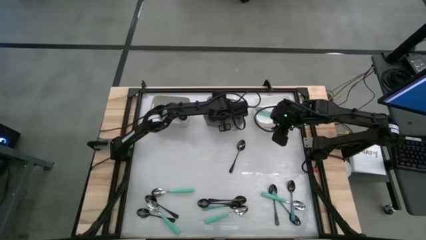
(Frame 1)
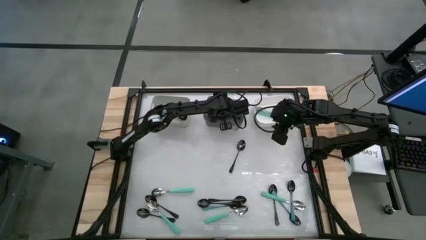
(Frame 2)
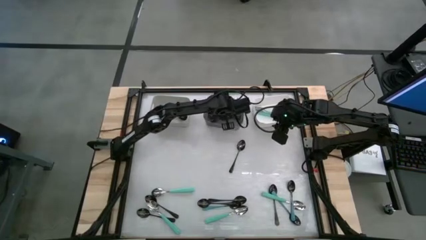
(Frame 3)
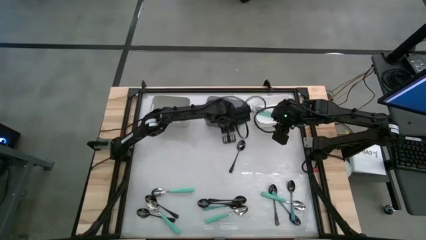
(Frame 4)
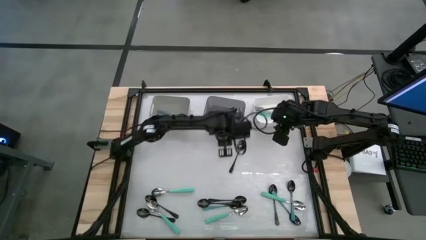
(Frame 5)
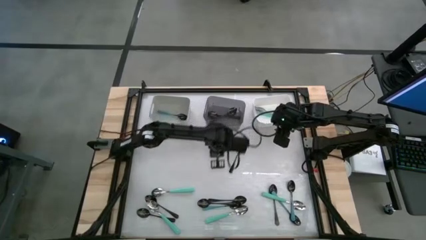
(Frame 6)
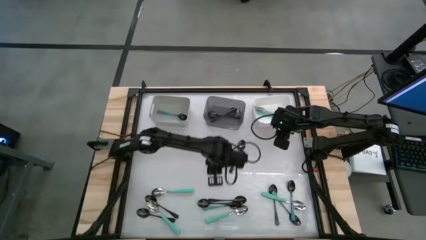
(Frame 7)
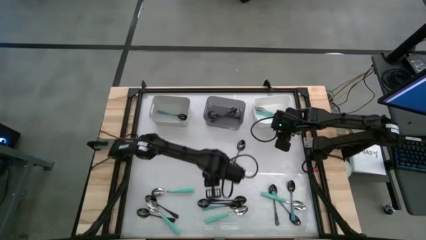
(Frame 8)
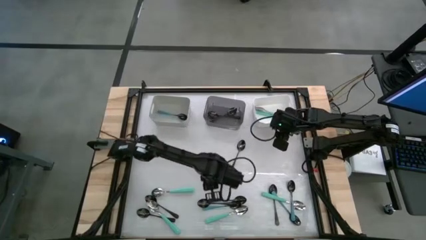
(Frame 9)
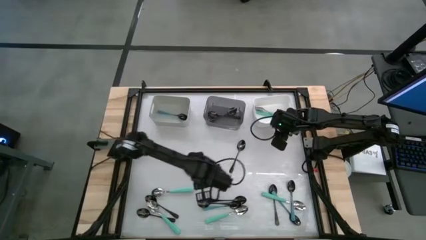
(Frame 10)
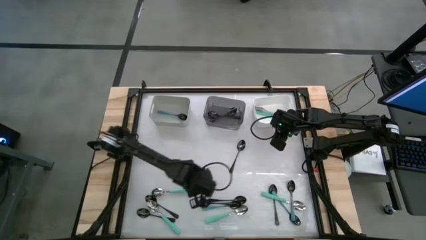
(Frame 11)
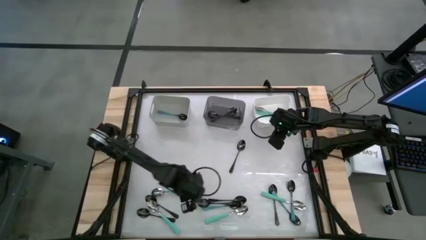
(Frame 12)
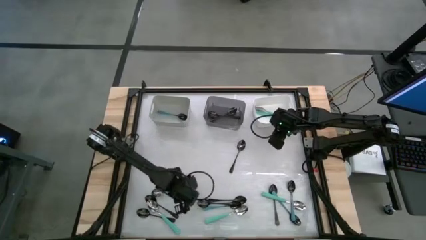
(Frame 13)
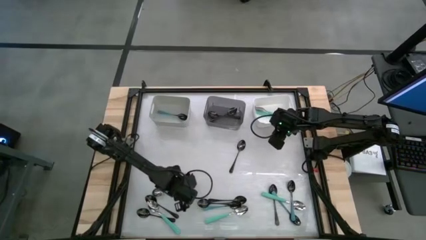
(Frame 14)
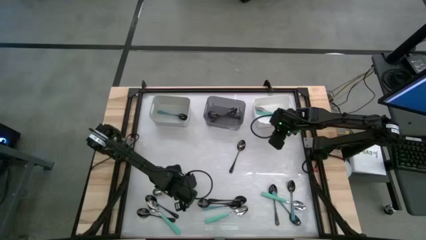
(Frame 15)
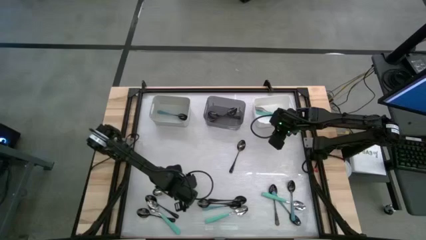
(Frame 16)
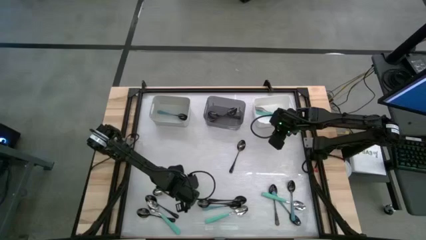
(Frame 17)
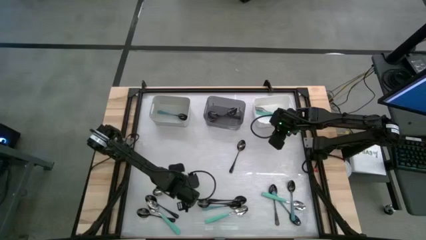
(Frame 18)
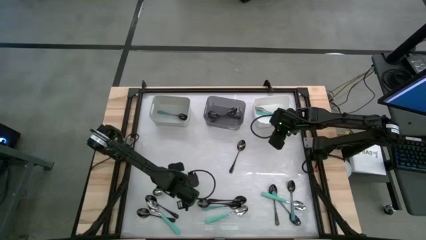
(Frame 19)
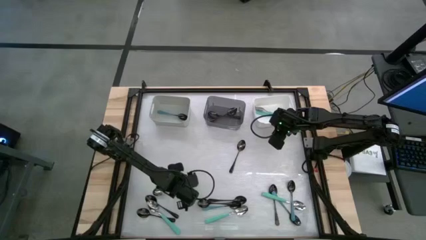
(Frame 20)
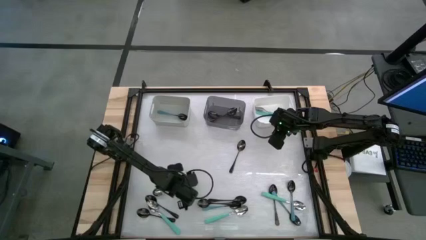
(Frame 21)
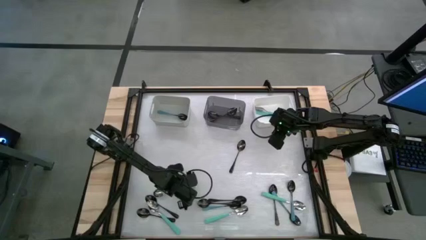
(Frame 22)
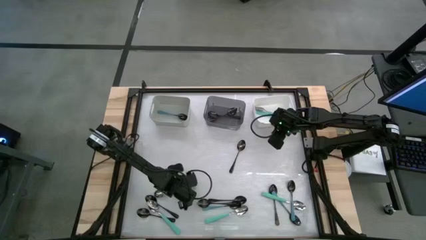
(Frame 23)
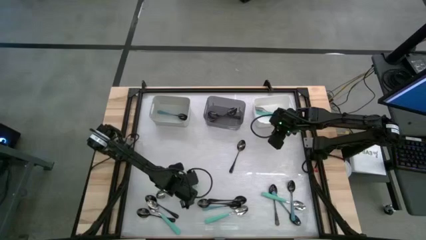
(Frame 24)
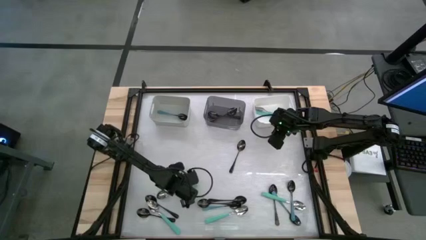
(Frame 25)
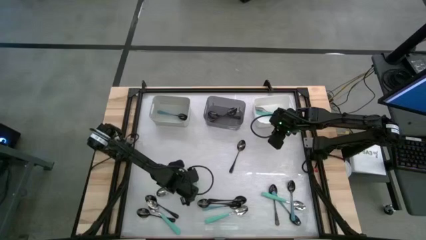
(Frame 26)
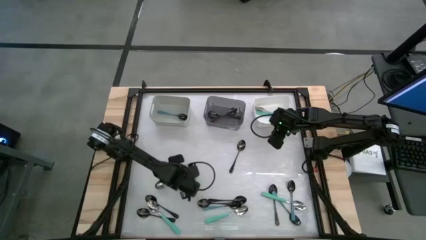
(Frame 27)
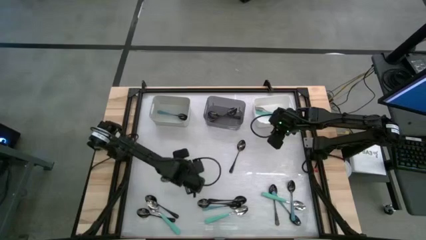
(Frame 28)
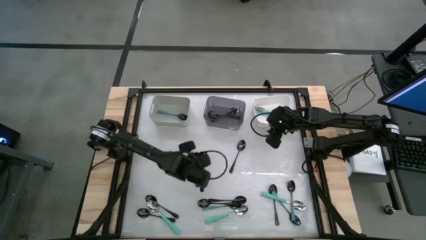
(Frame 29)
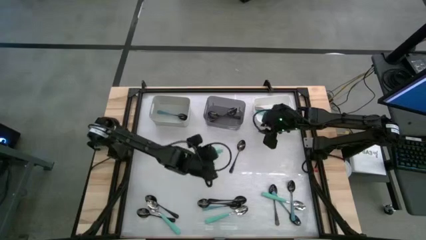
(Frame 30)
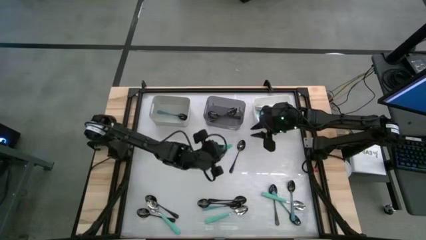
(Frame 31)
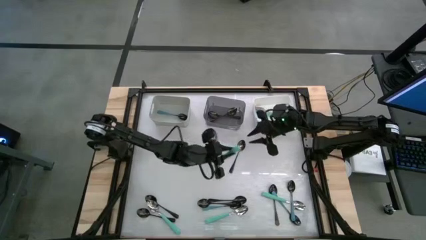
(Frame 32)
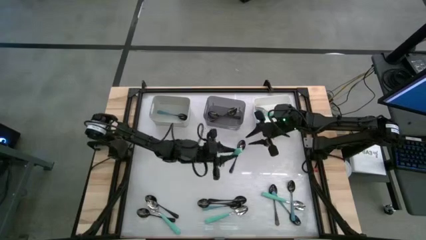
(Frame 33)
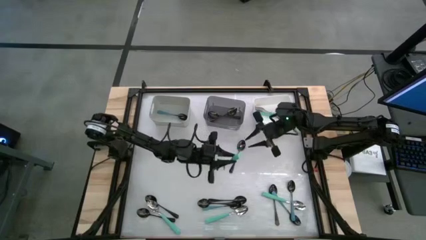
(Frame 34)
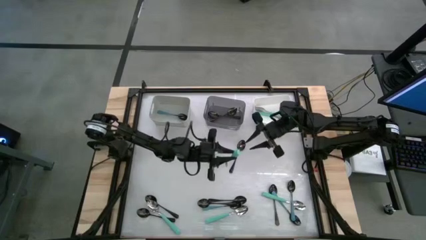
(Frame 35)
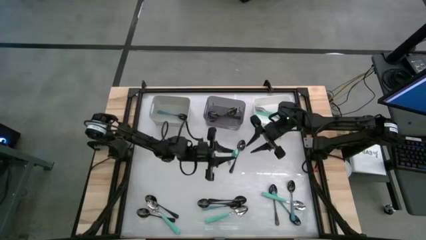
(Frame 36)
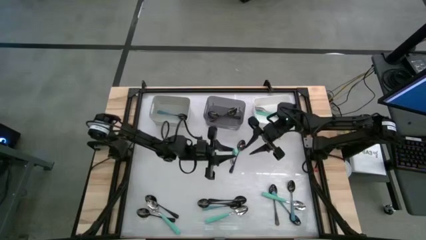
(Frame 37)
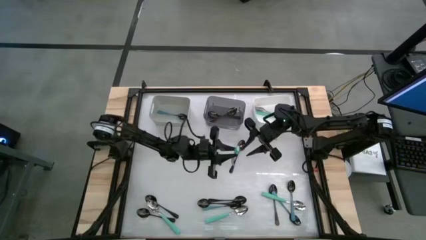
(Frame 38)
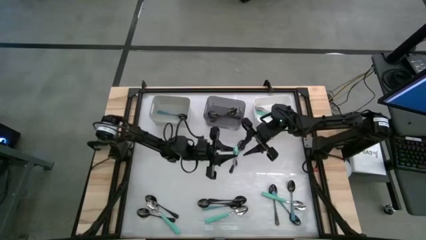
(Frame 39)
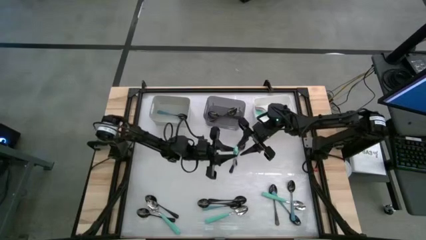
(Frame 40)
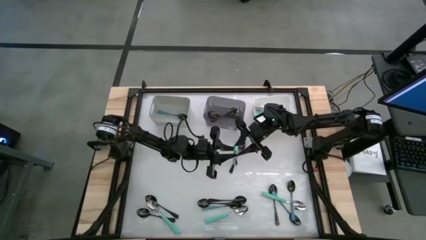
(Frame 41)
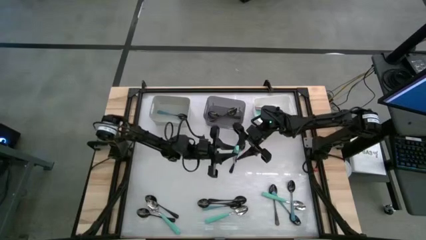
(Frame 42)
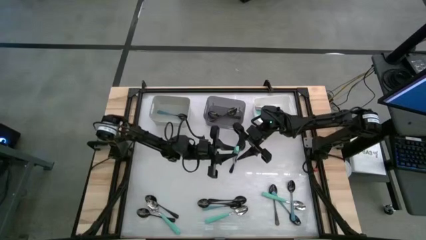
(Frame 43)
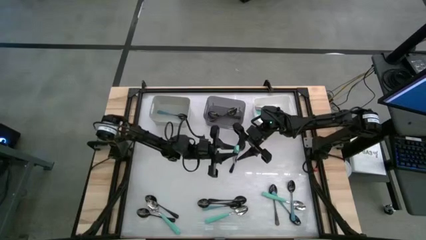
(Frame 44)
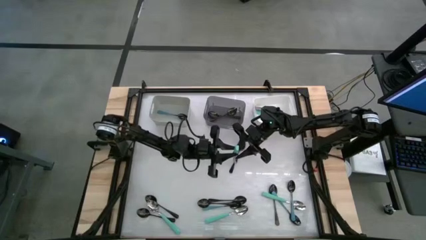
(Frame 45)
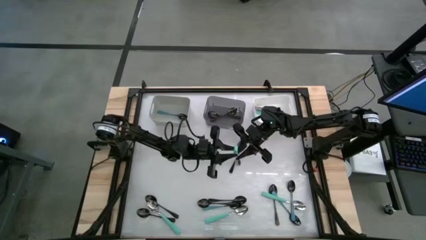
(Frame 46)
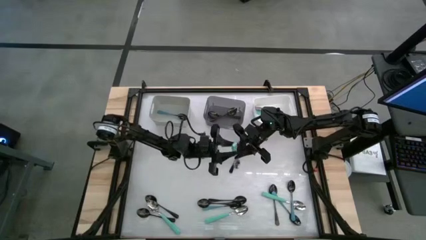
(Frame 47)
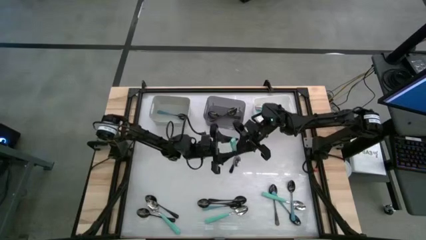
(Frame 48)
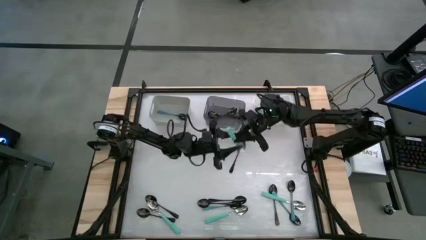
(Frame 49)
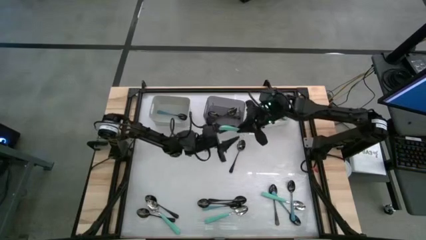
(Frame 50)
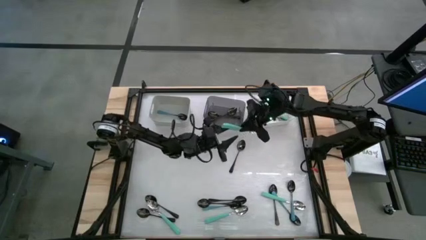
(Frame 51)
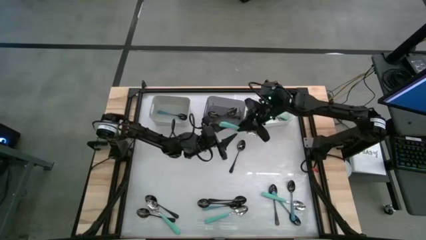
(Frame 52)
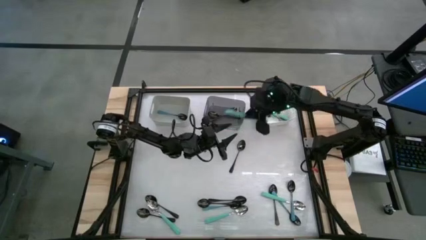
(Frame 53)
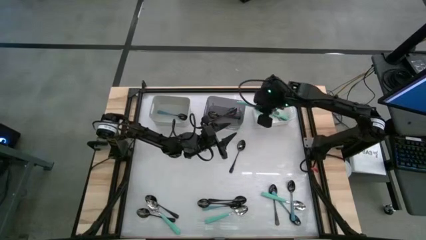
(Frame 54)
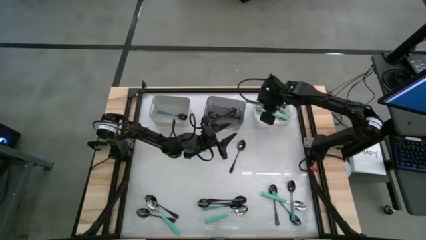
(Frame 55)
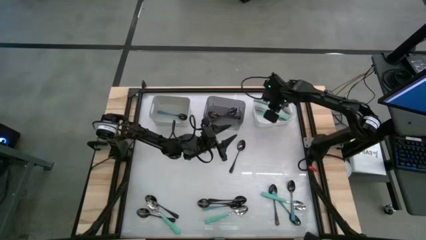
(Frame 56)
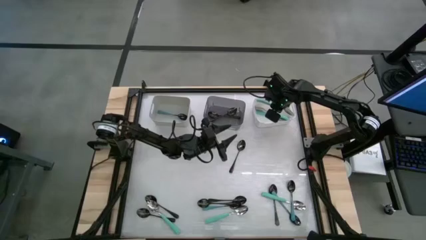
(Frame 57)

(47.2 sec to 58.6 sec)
Task: Sort silverware by color (type)
Put the green spoon into the white bin
